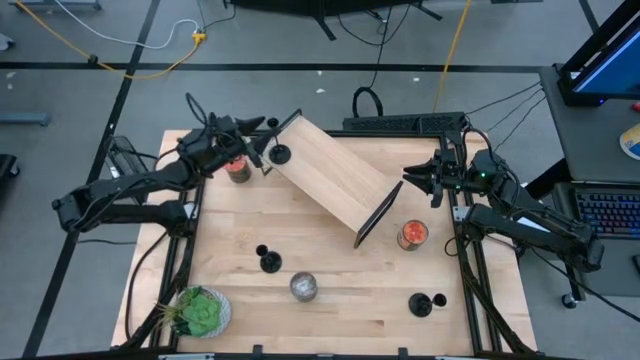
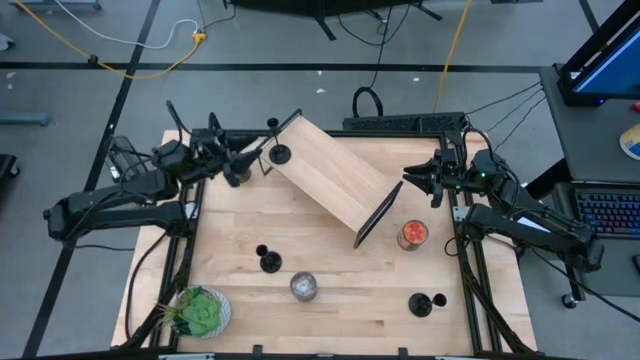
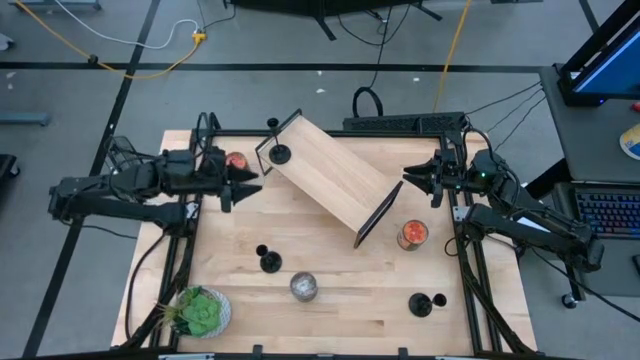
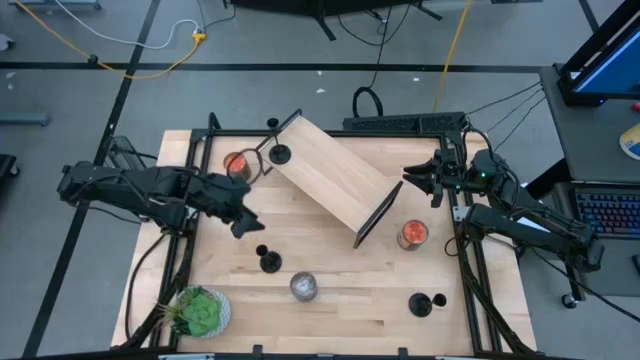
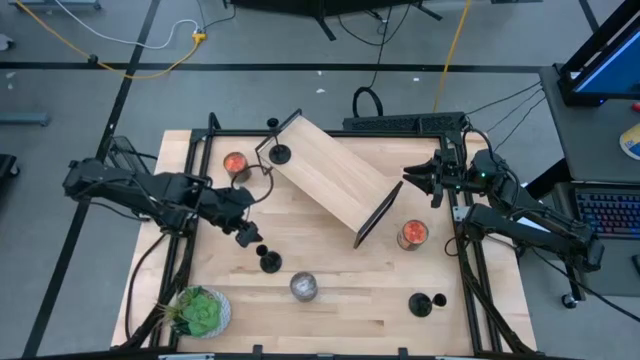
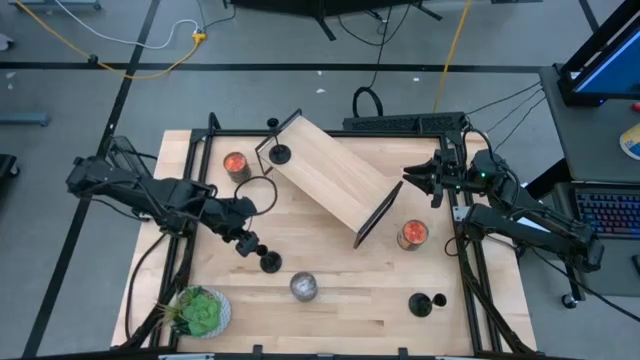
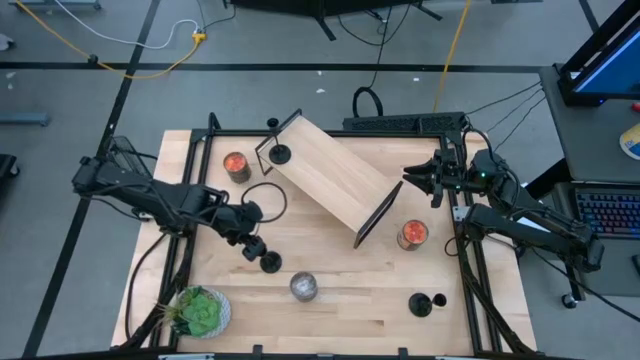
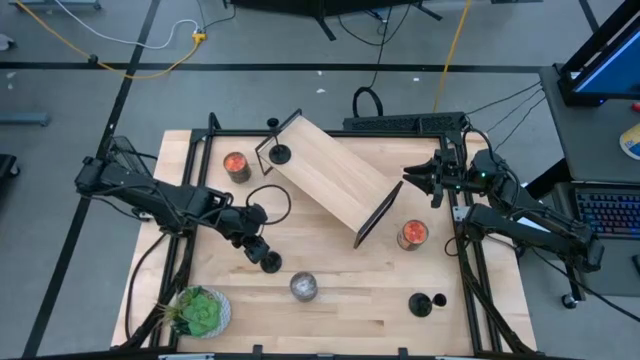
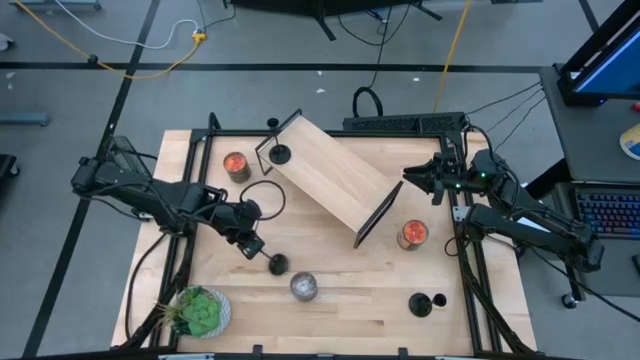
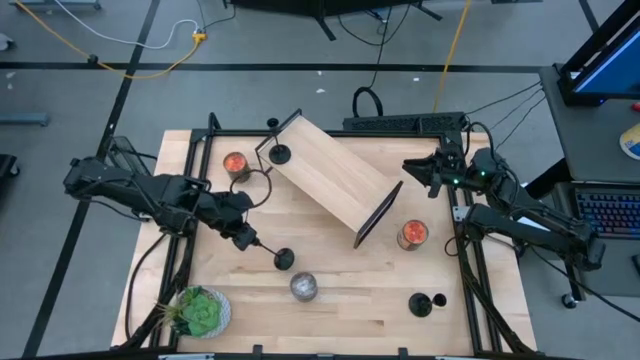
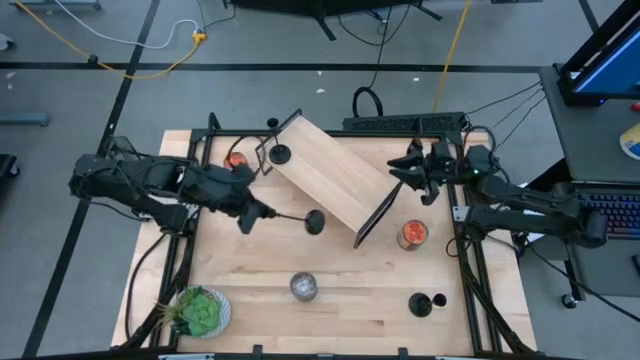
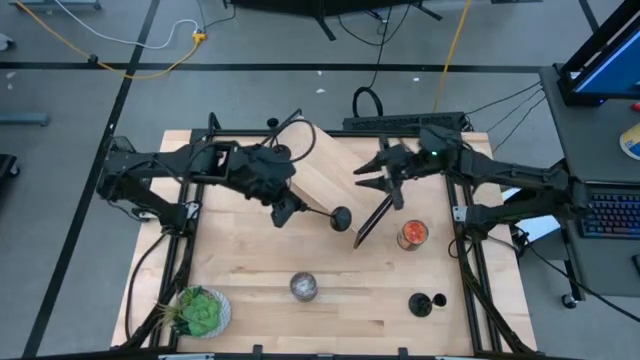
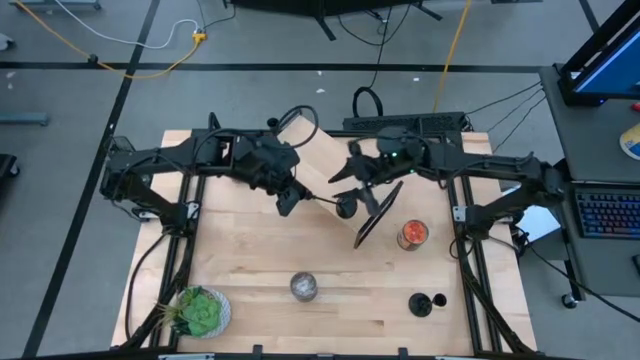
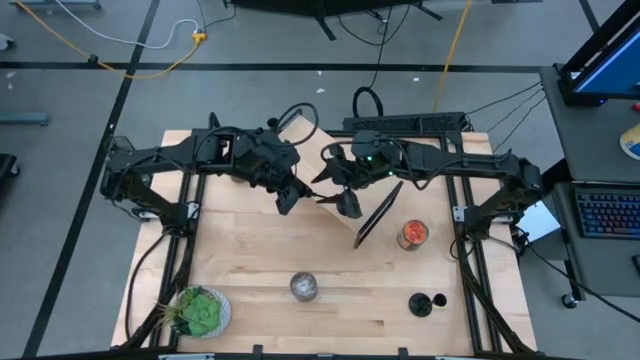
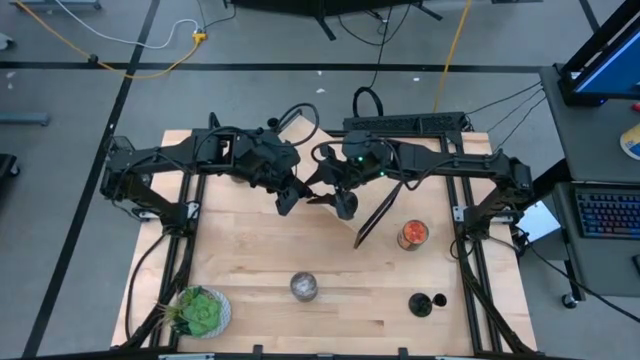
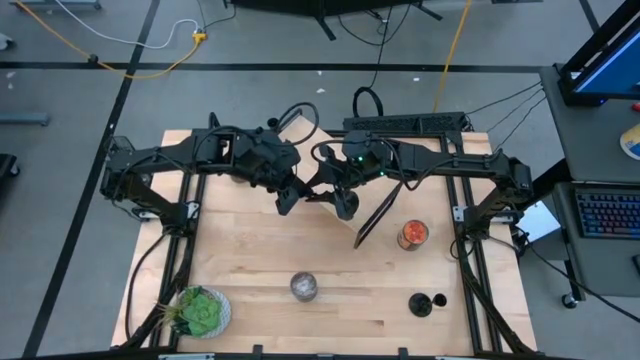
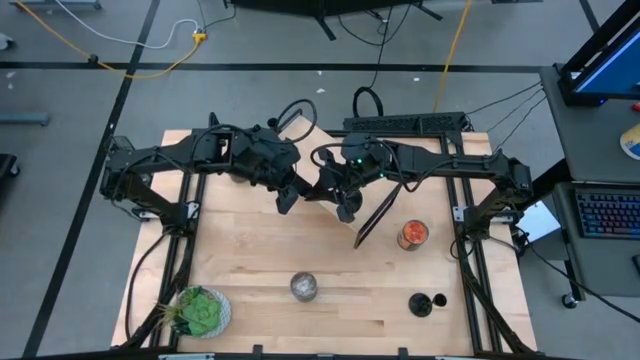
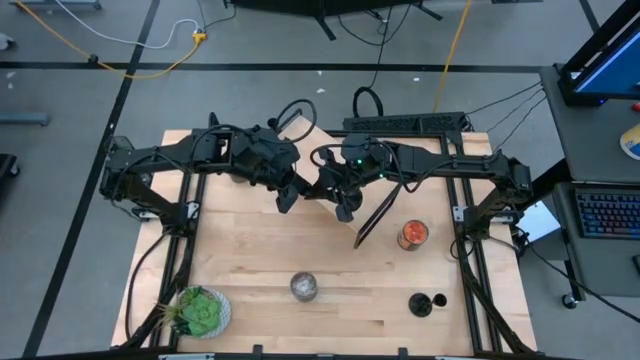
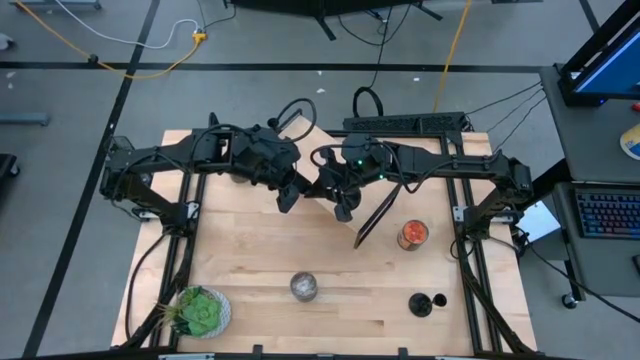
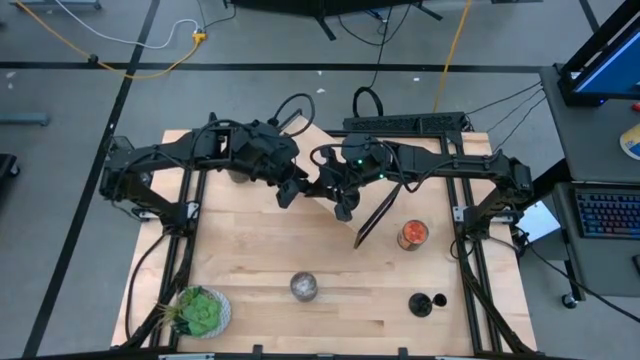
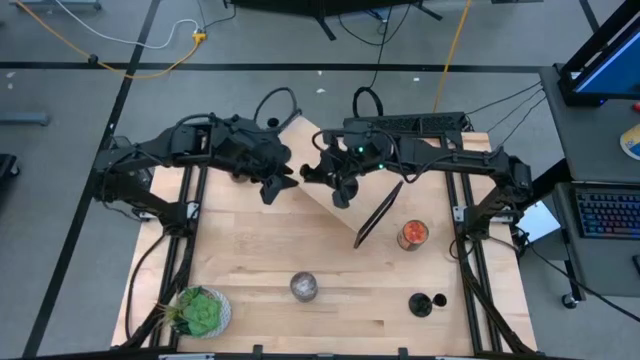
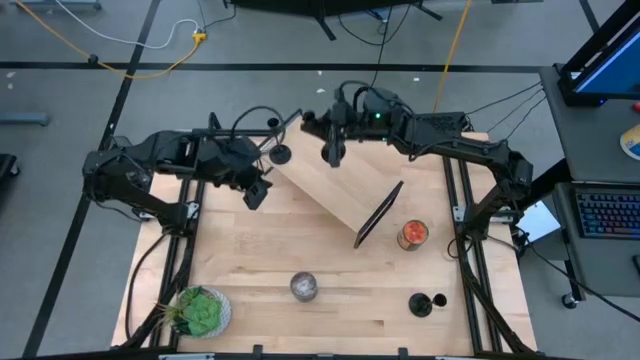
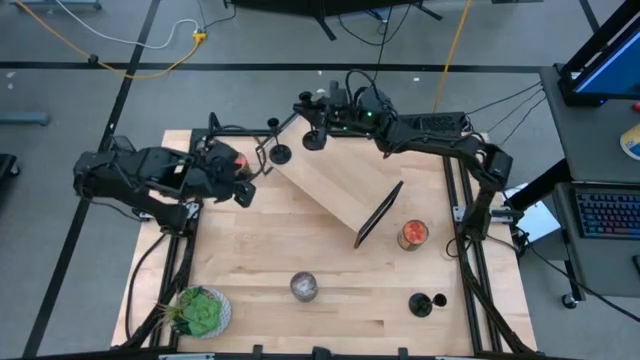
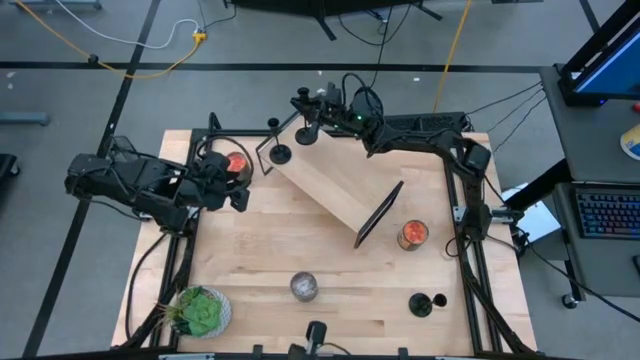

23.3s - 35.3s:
Task: Pick & Place candle stick holders
Align the left black candle holder with the other black candle holder on the shelf

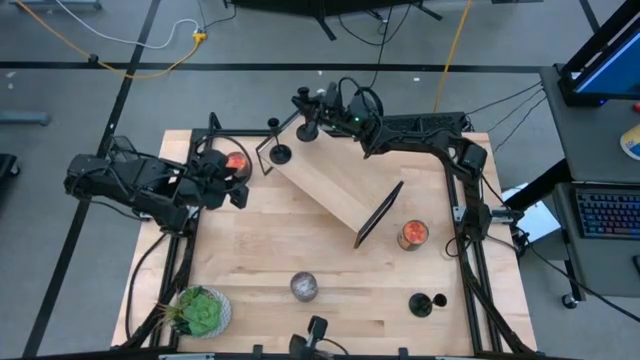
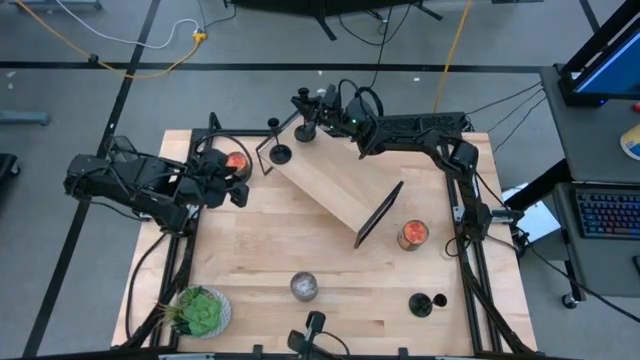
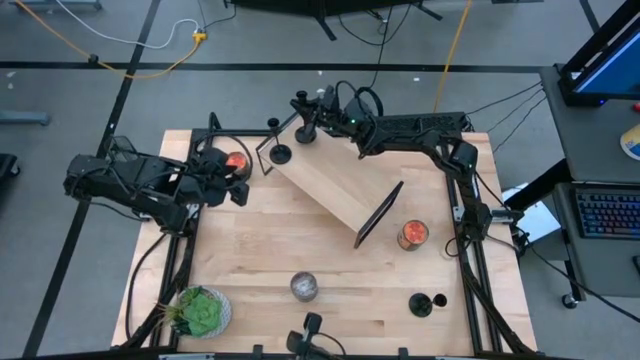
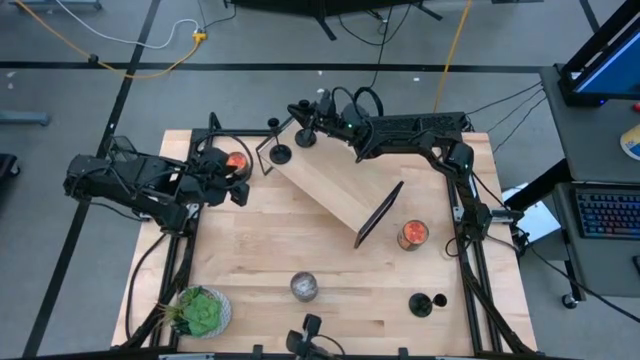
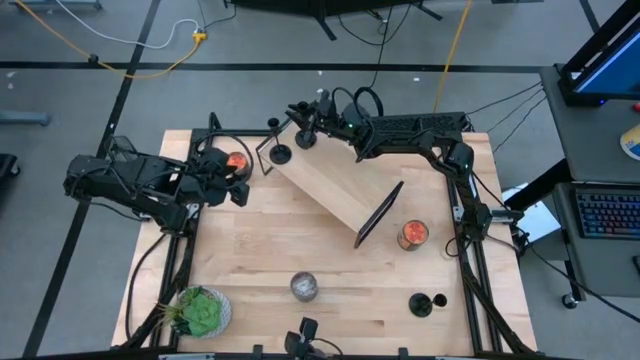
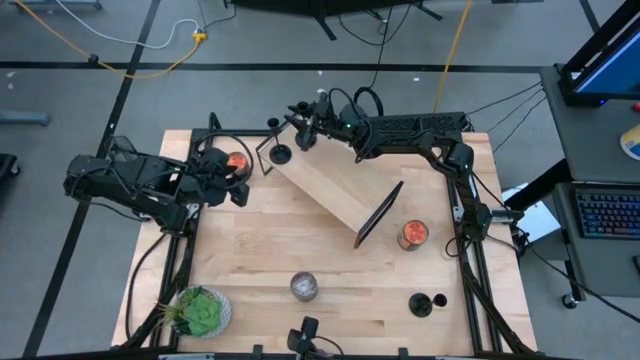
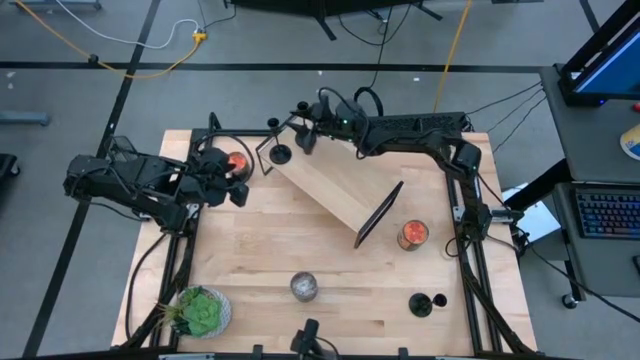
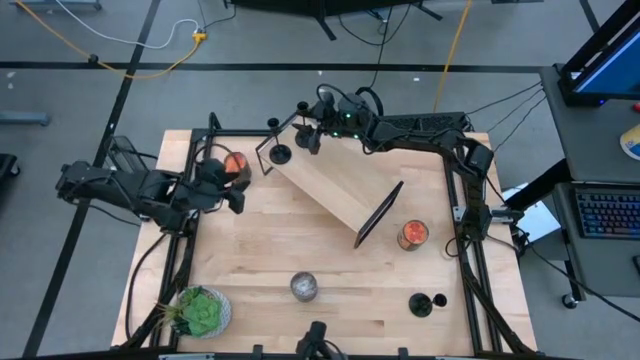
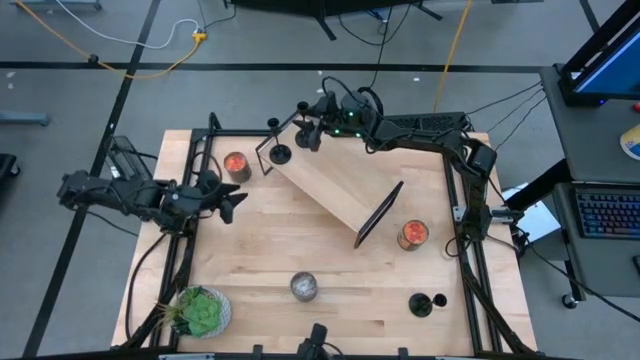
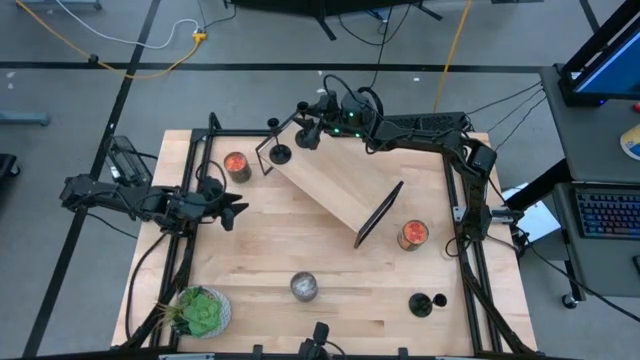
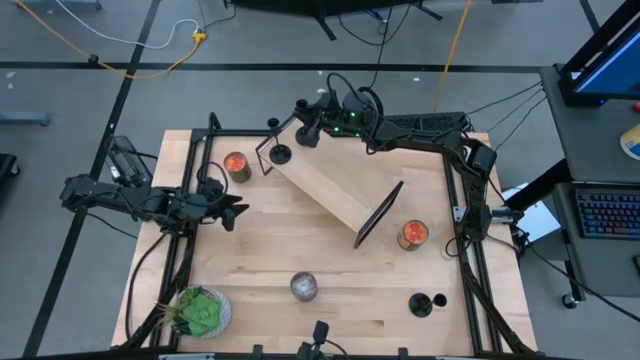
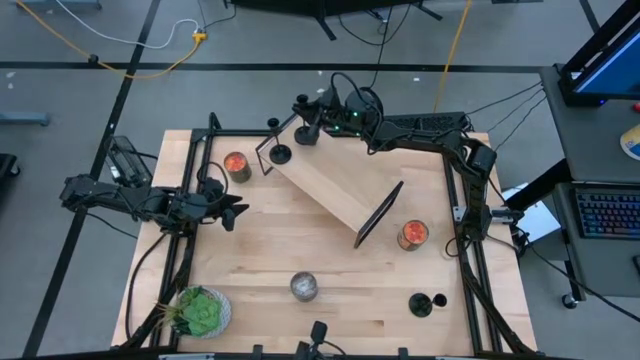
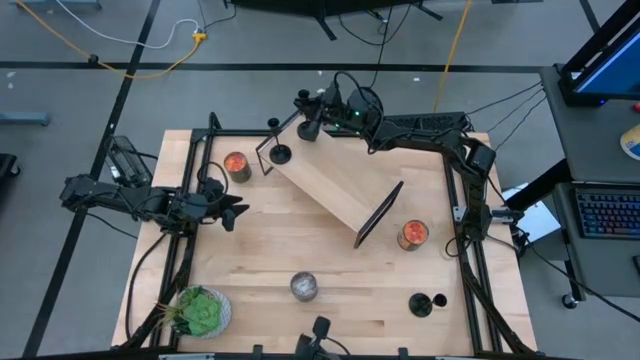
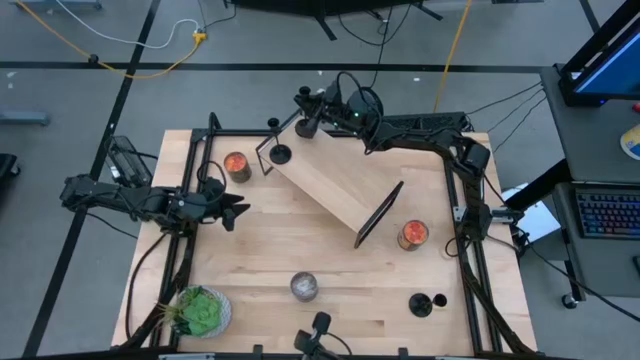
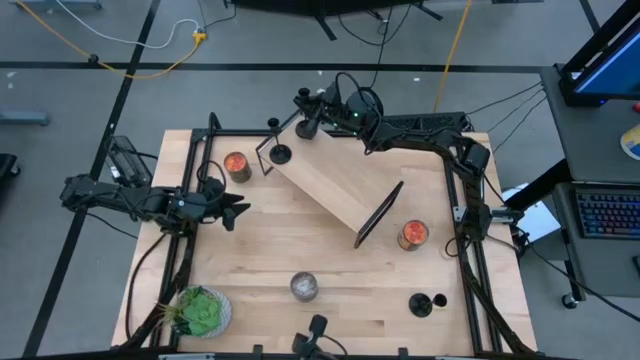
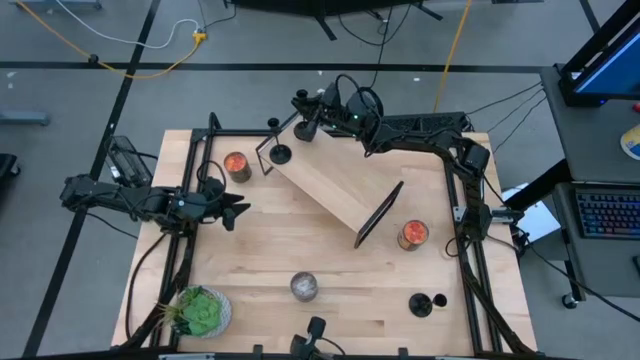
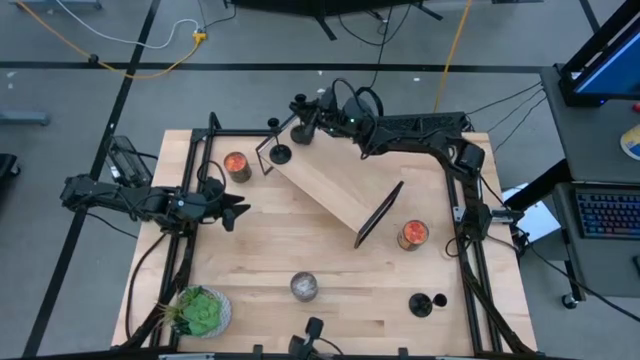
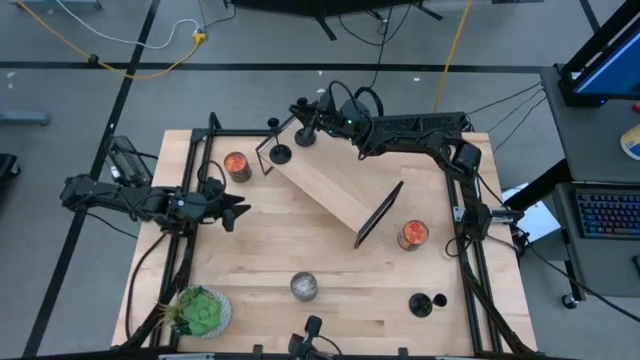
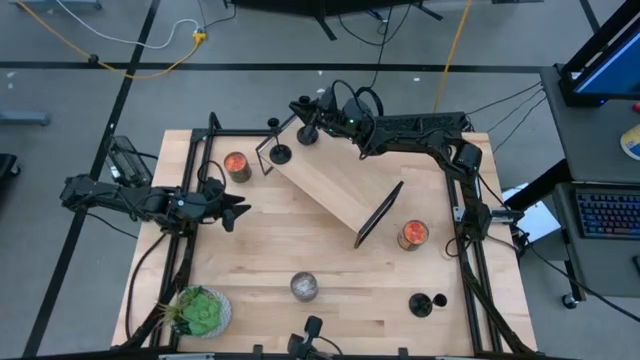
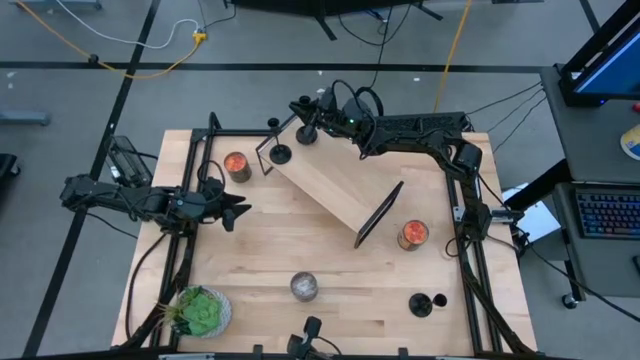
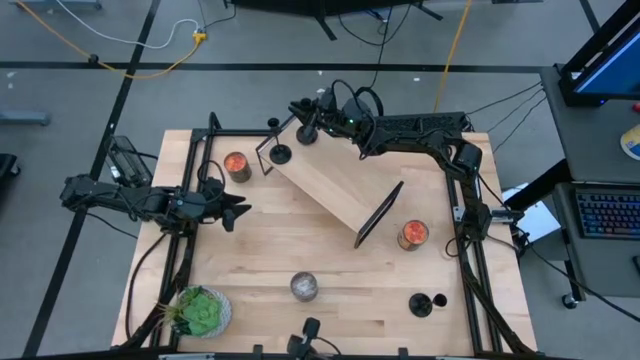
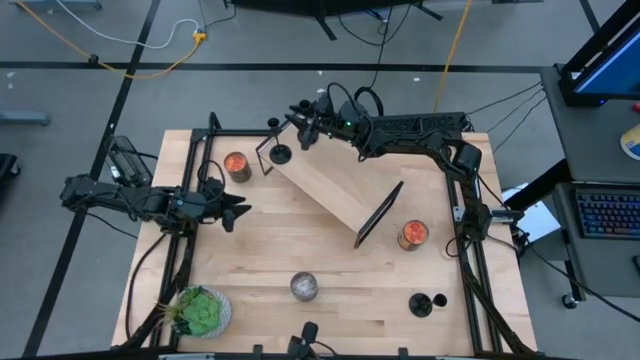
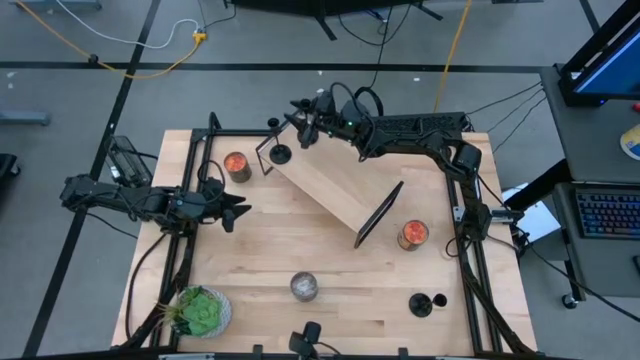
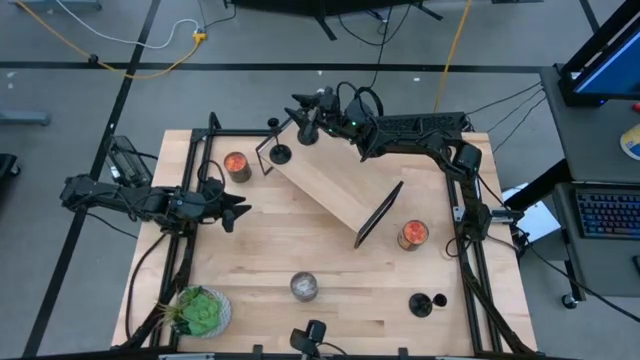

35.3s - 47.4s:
Align the left black candle holder with the other black candle holder on the shelf
